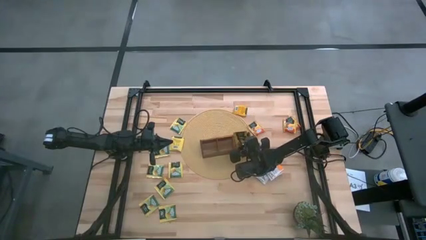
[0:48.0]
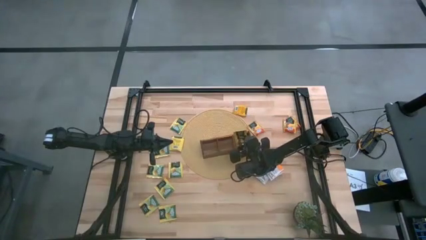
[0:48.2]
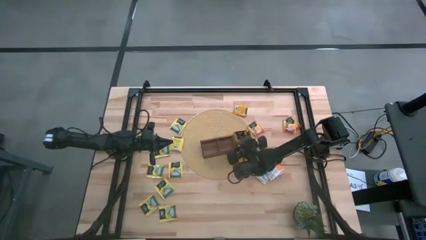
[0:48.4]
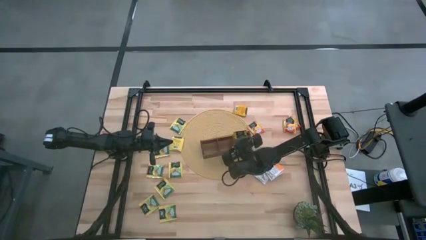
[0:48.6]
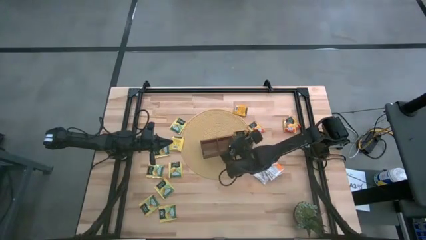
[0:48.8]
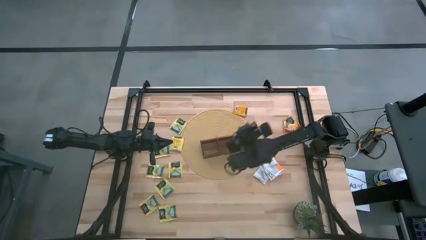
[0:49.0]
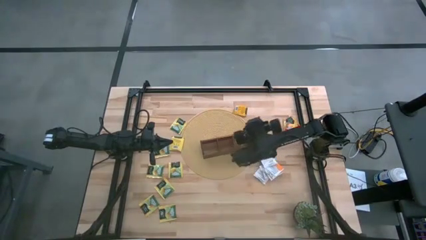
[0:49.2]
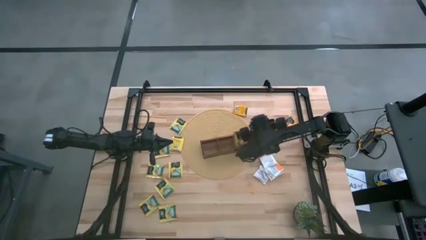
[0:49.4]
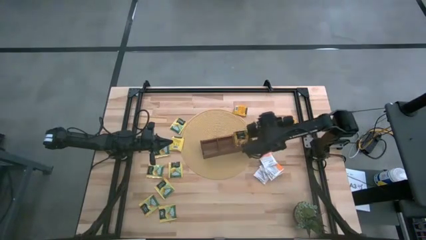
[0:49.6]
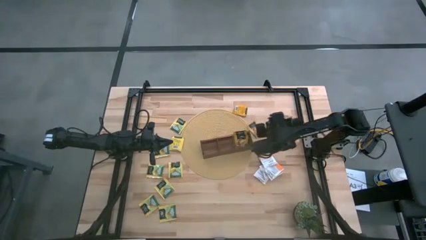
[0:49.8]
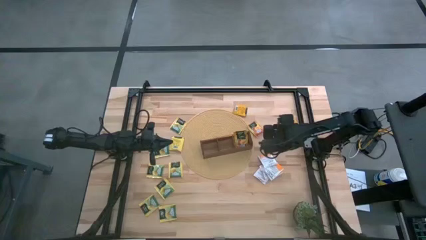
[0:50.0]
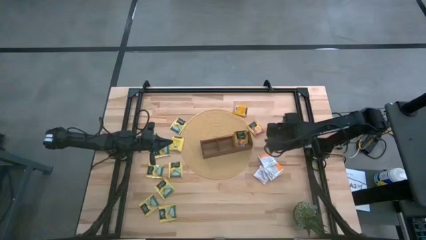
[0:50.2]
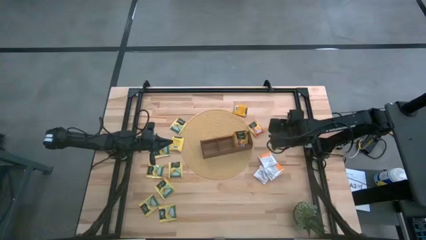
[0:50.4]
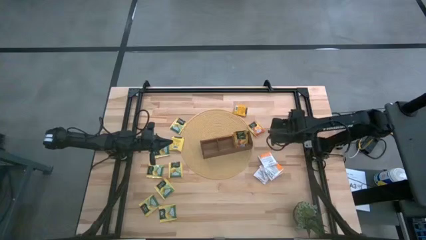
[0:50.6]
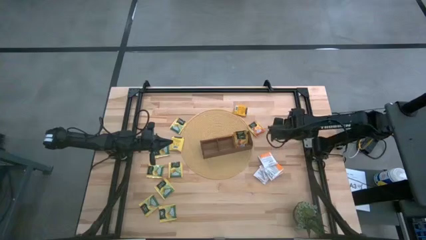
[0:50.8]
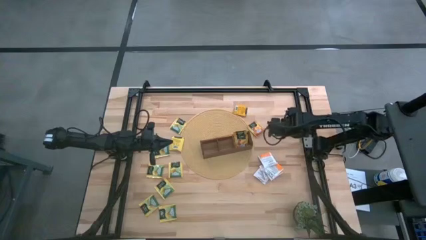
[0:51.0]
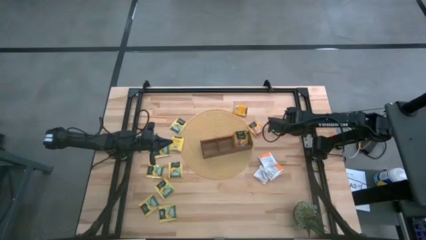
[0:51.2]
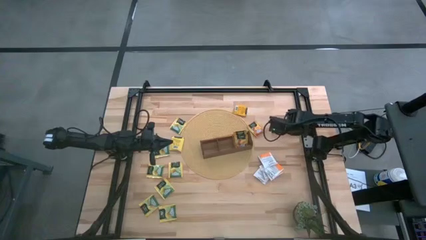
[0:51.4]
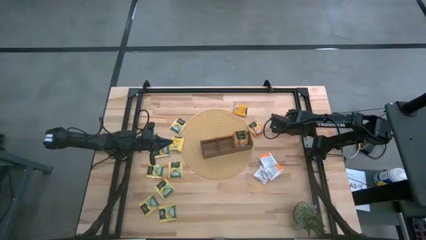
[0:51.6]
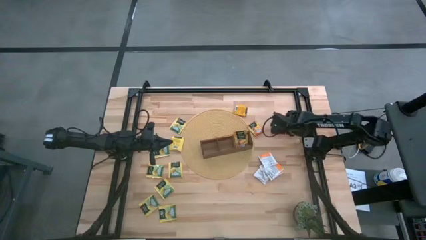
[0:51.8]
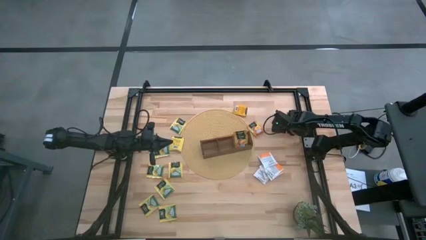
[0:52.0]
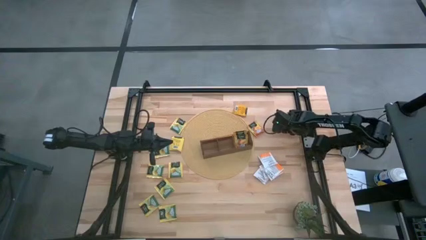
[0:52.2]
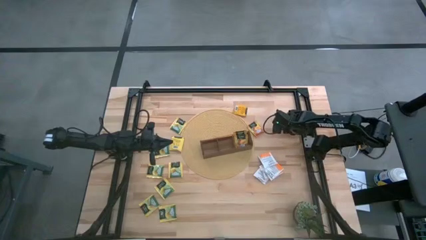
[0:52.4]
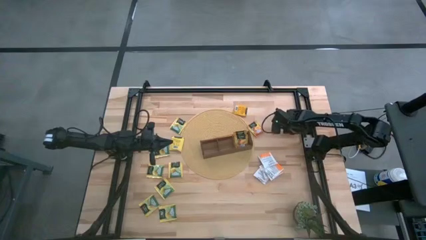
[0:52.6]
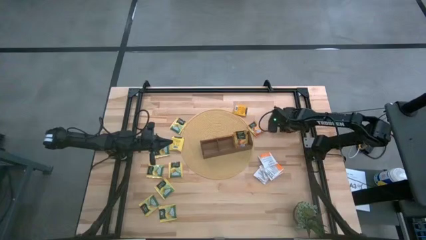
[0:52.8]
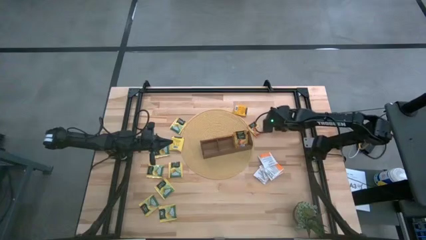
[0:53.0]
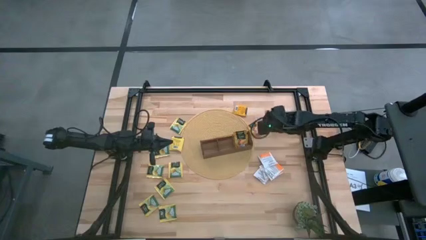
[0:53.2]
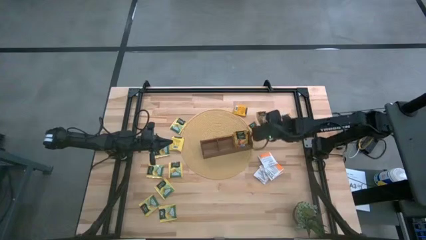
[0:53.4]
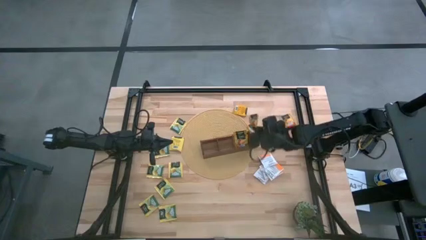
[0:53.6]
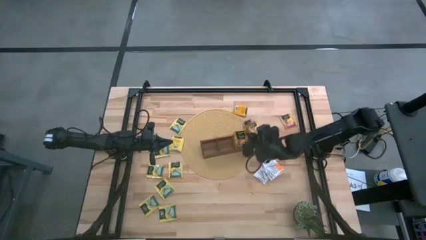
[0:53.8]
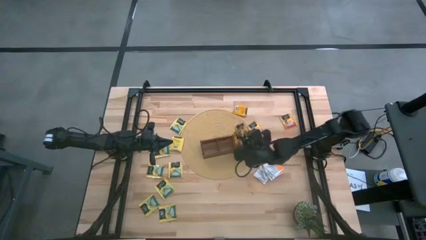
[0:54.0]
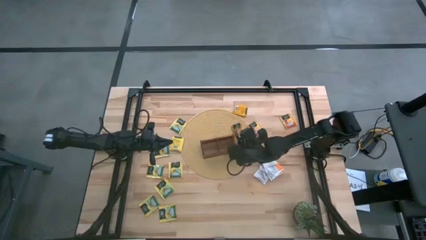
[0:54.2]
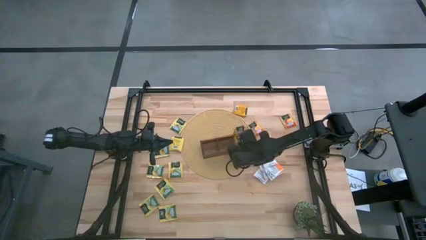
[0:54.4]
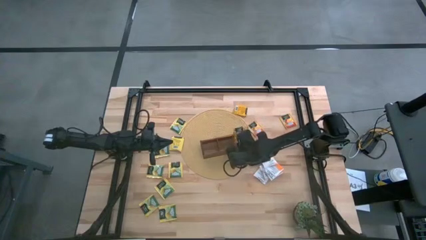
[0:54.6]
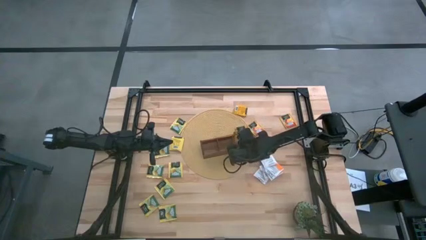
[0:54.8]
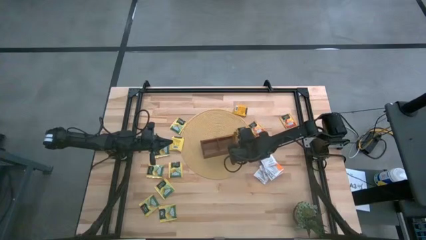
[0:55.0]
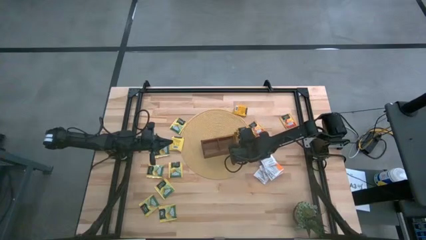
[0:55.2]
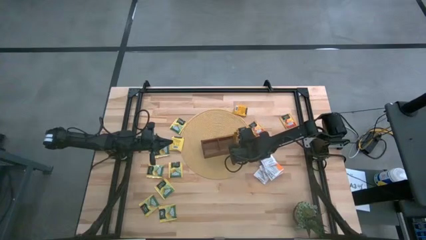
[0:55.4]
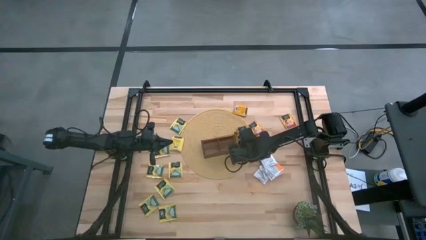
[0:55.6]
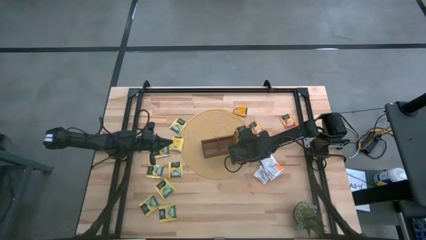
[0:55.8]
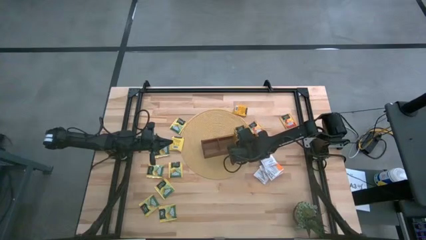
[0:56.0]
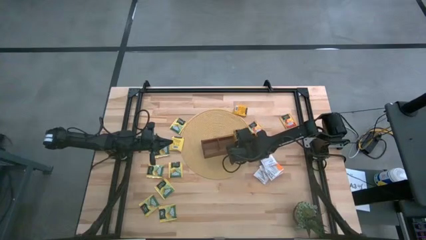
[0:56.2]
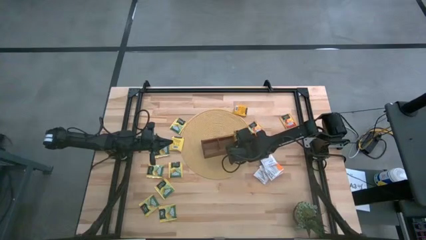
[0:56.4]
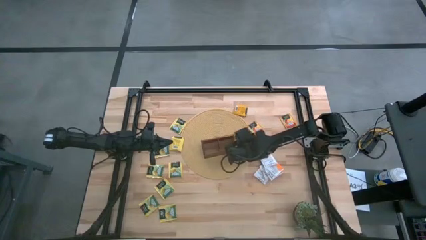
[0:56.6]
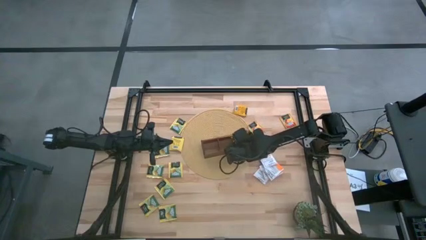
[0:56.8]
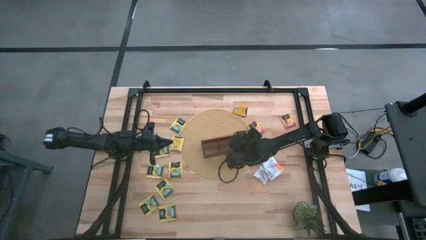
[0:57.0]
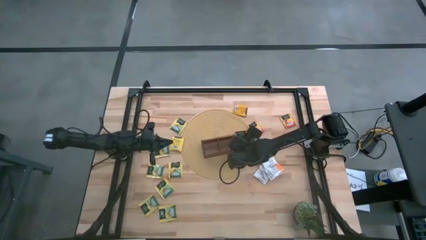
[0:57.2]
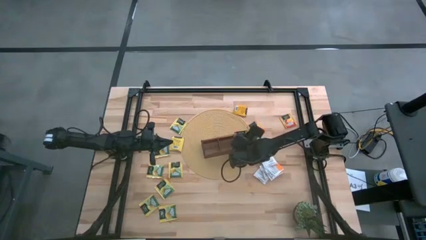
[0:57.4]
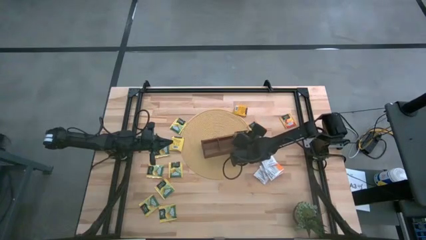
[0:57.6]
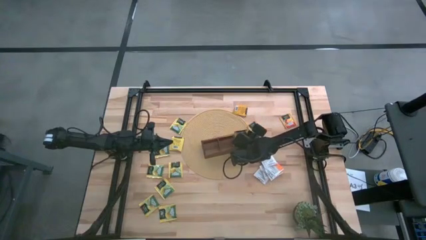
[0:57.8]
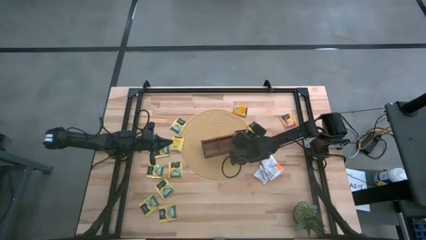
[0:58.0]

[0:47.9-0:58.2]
Task: Pick & Place Tea
Put the orange tea bag into the right section of the wooden organizer
